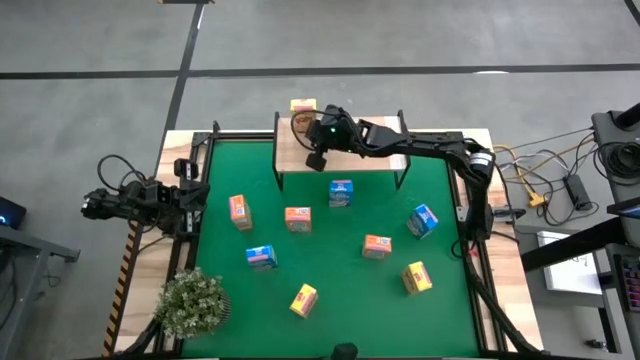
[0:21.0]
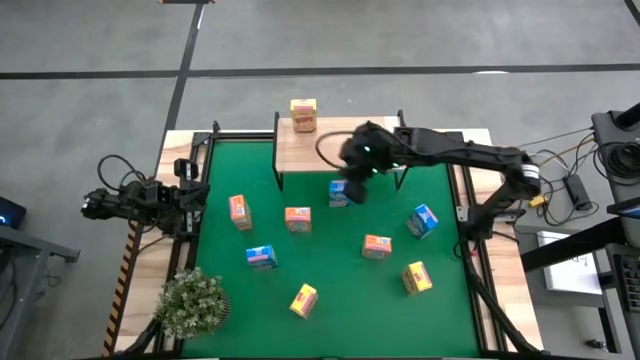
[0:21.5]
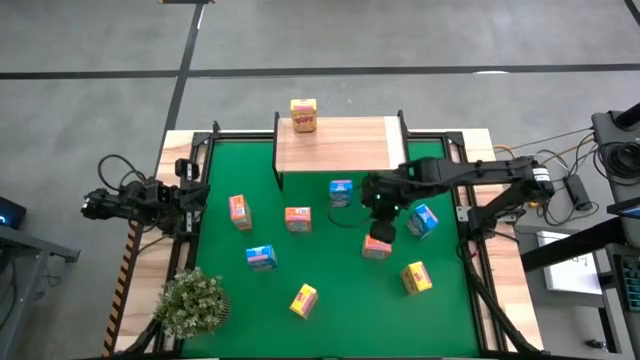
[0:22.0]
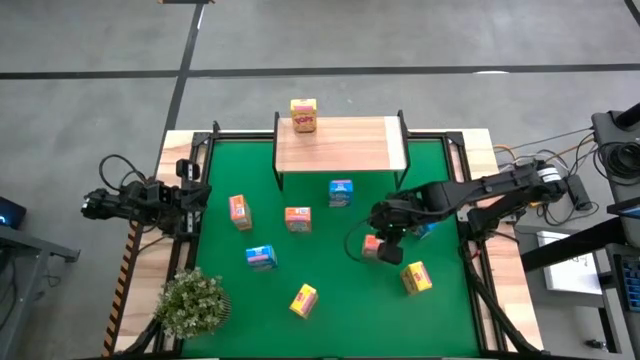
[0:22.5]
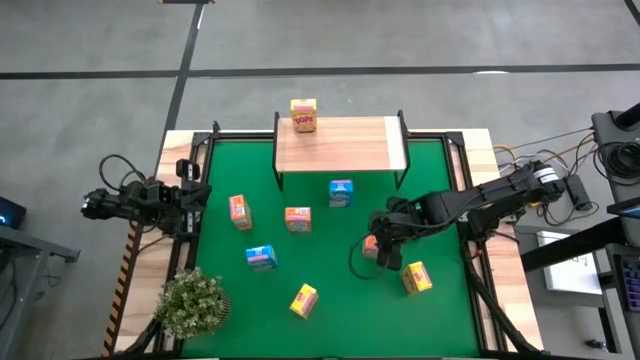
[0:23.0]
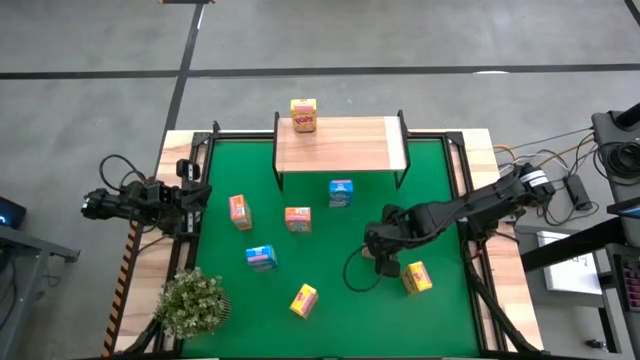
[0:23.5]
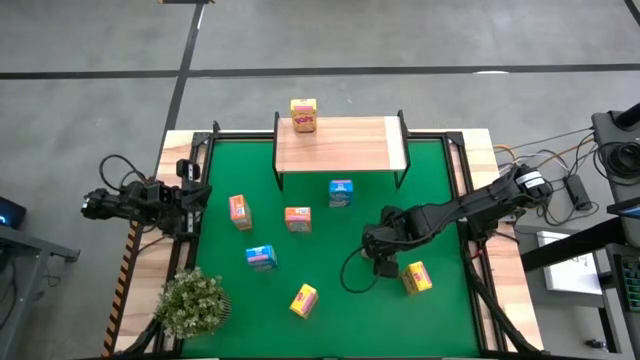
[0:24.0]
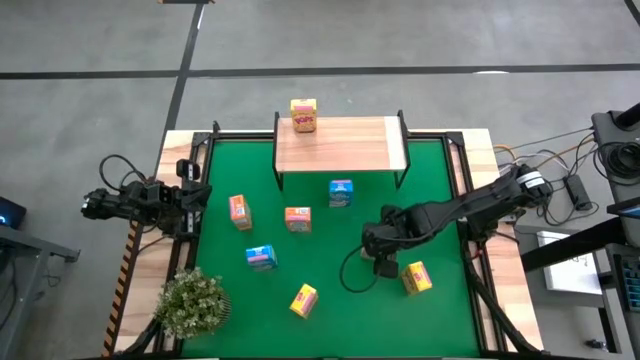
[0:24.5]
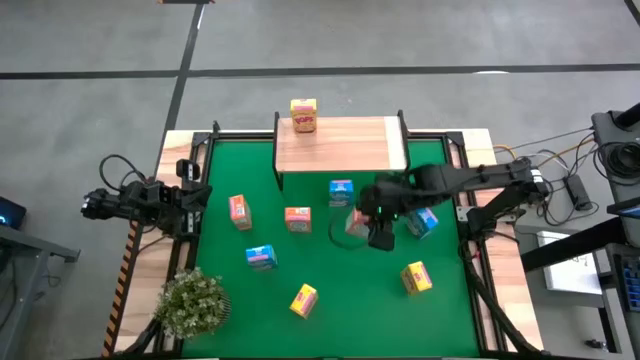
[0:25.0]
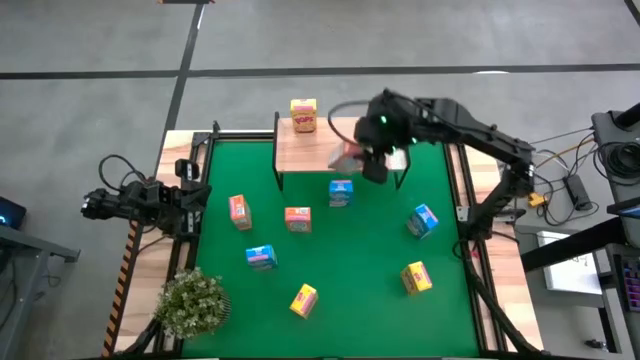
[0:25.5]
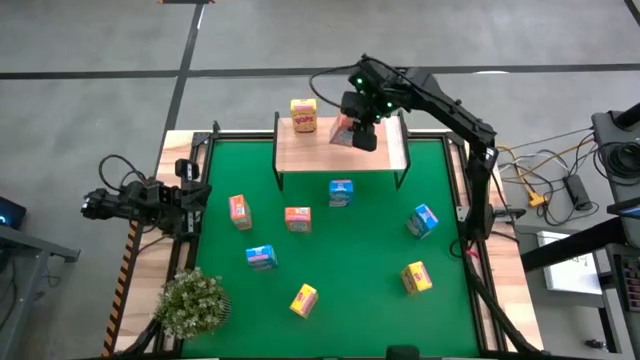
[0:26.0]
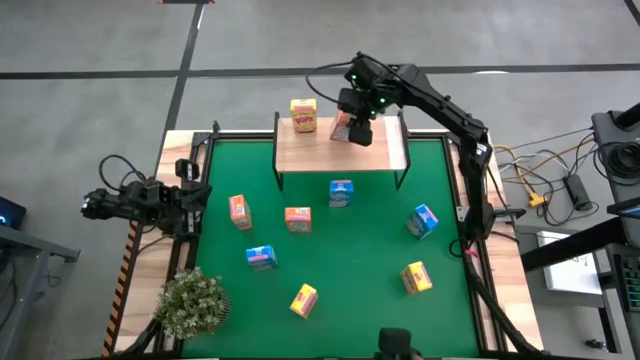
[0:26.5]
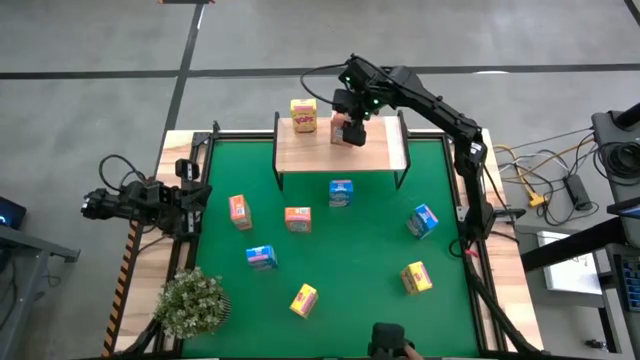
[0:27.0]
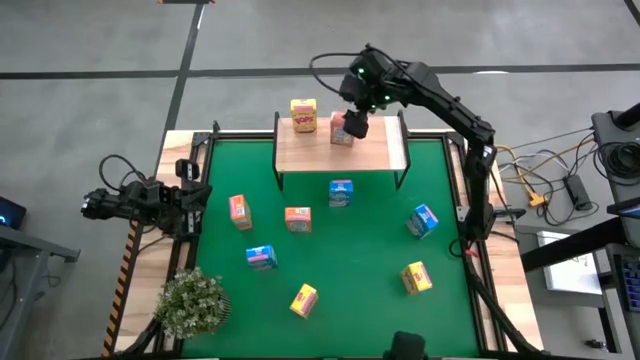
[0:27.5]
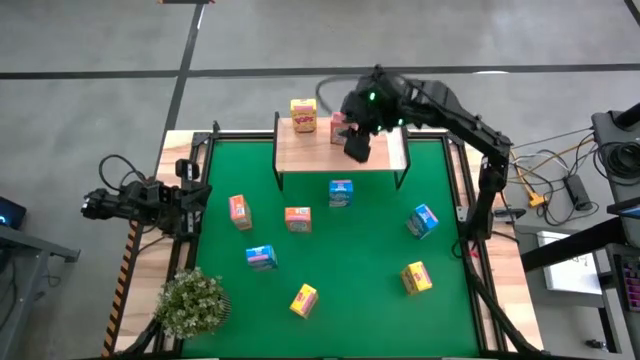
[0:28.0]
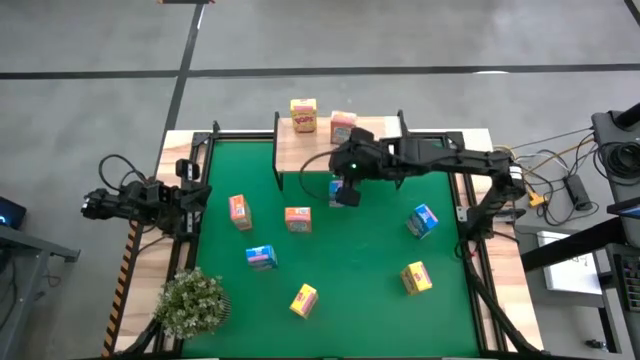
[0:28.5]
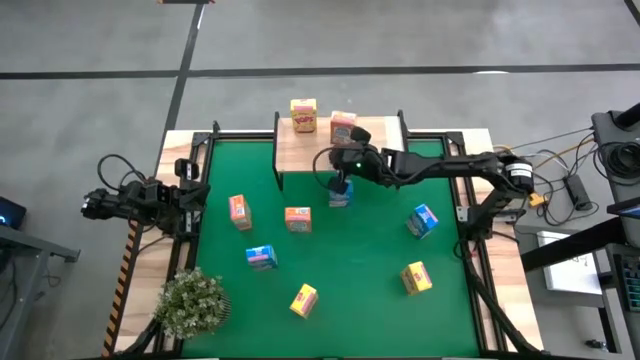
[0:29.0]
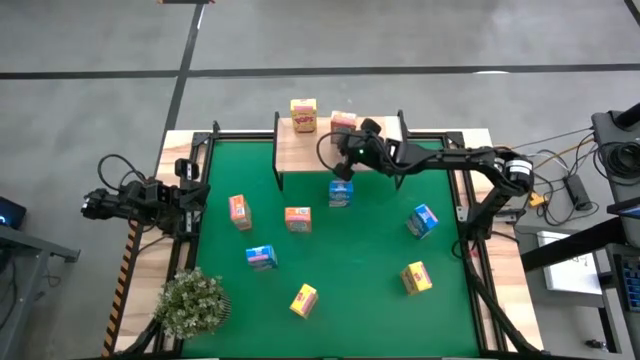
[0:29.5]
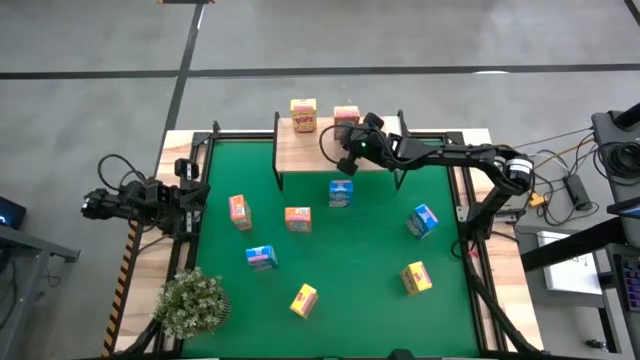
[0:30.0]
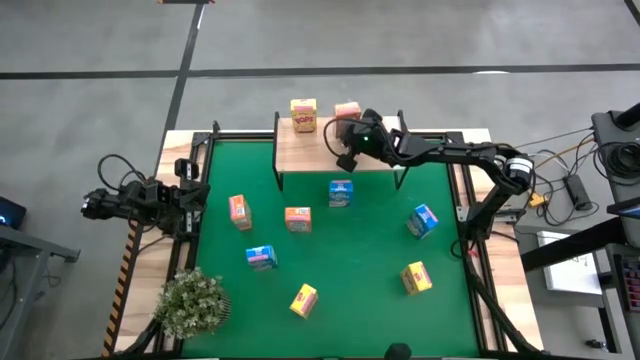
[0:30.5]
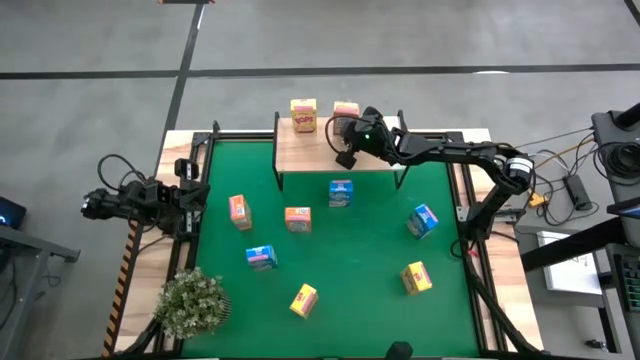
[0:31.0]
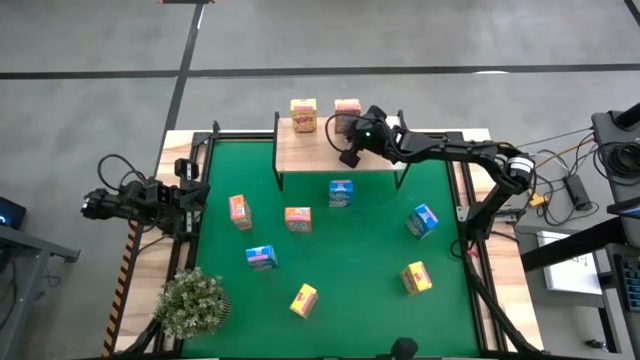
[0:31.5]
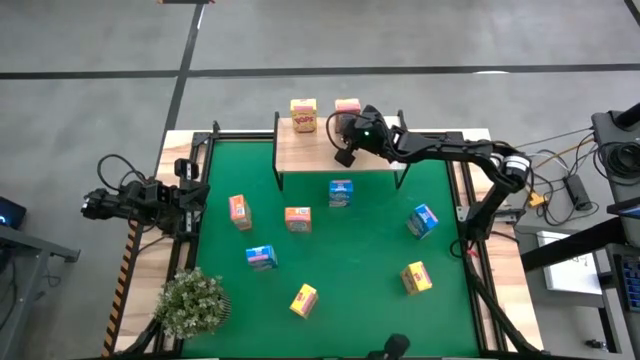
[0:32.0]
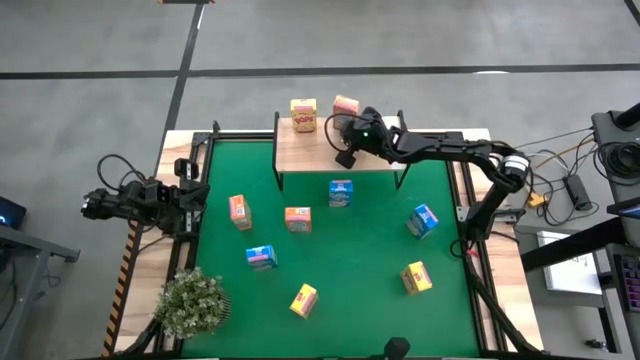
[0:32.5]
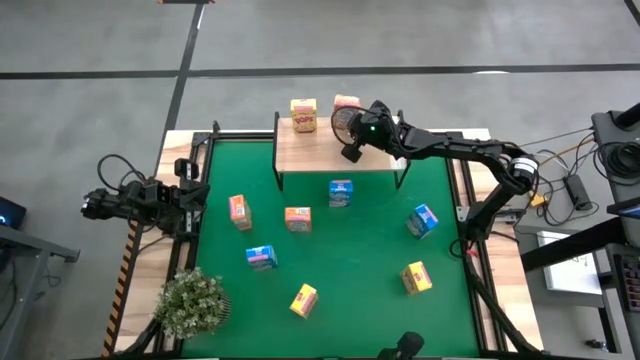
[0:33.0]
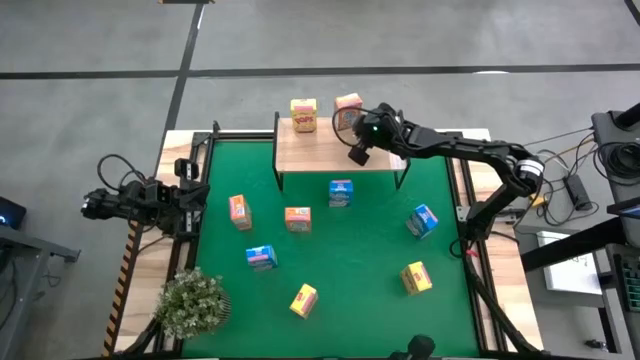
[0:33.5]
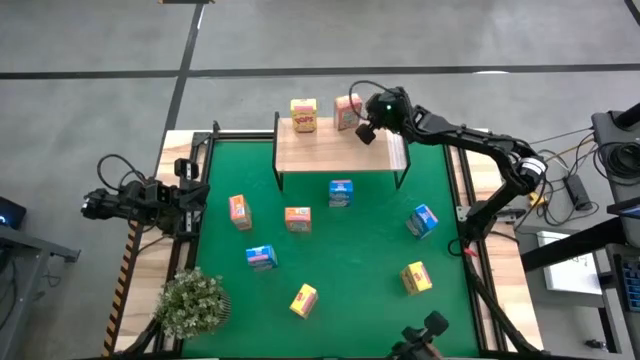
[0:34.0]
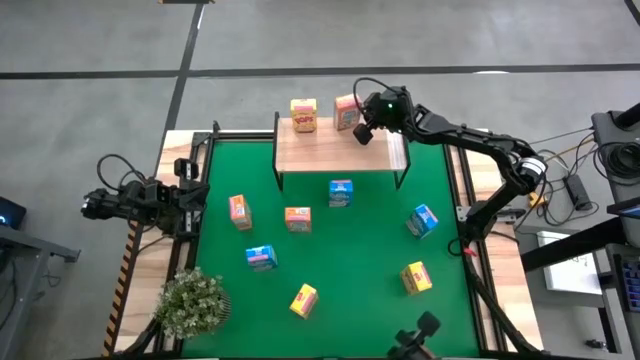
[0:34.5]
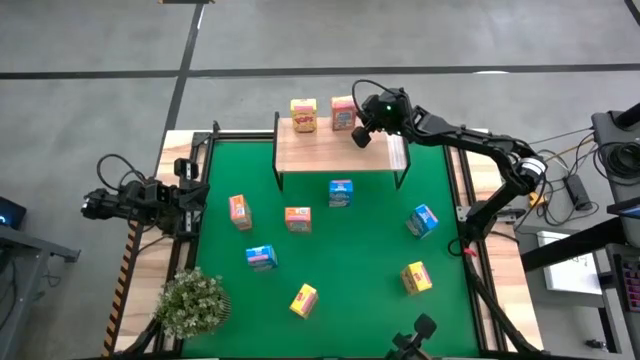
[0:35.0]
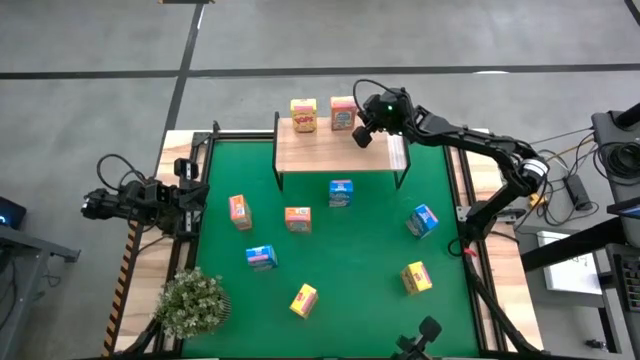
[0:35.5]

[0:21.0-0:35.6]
Task: Stack cereal on shelf
Put the right orange cereal box on the shelf

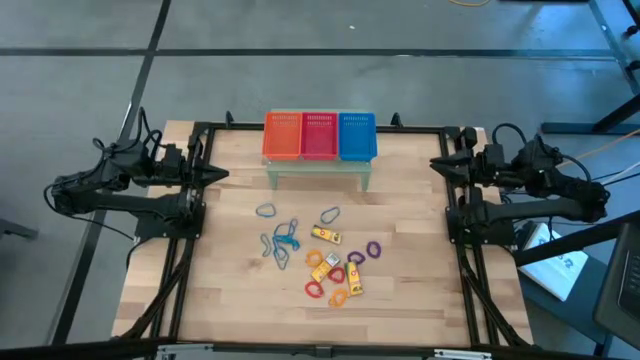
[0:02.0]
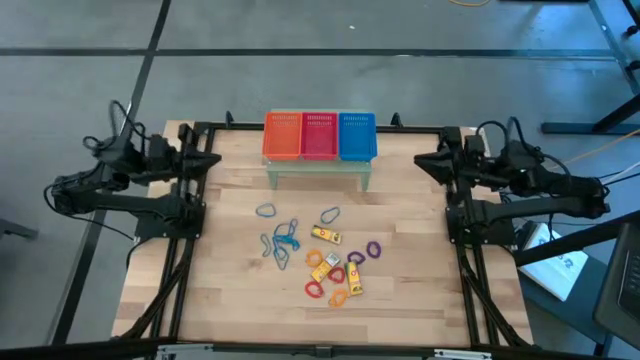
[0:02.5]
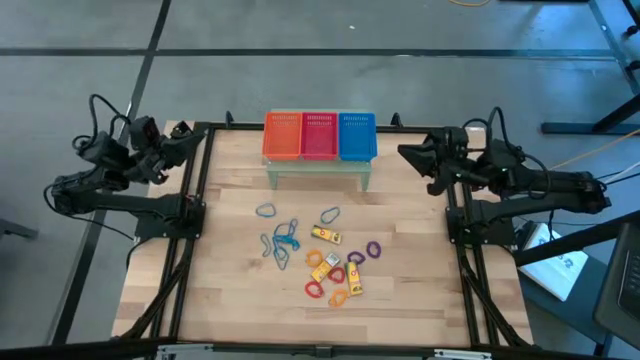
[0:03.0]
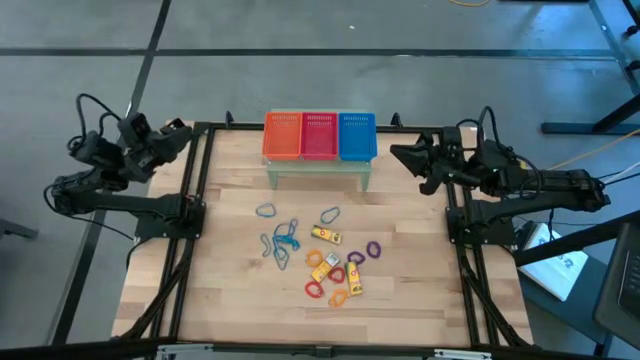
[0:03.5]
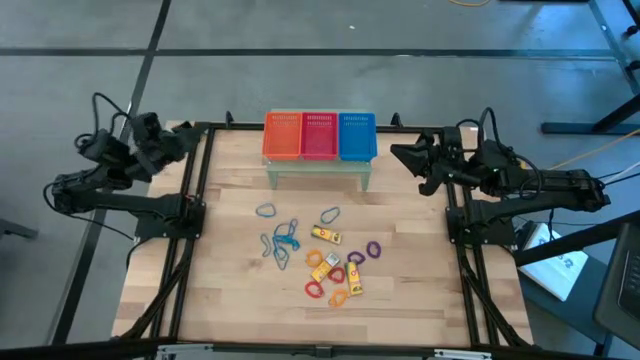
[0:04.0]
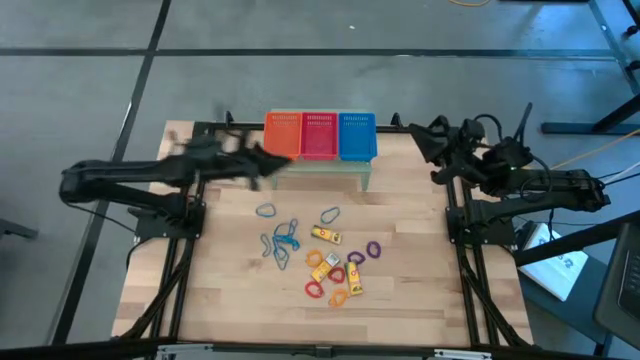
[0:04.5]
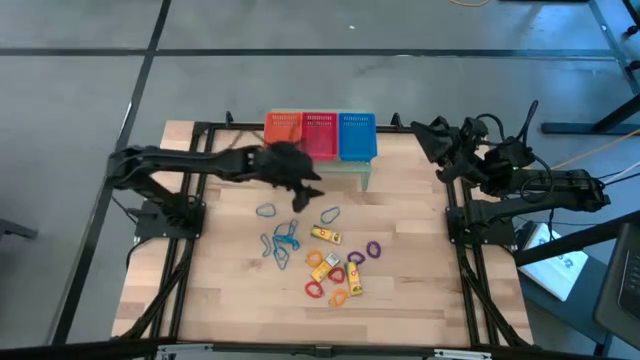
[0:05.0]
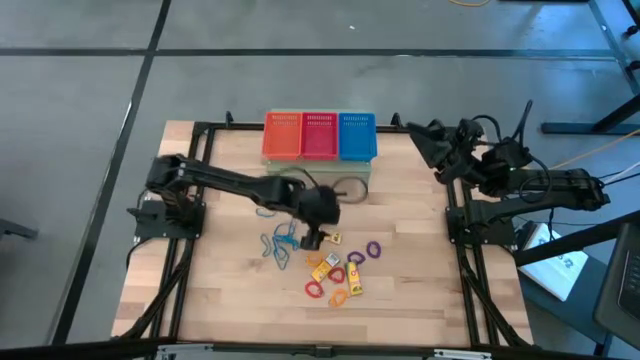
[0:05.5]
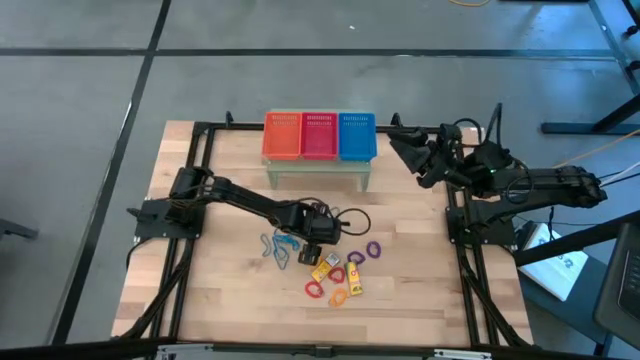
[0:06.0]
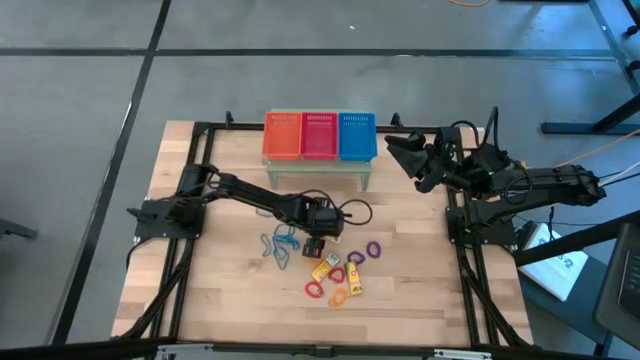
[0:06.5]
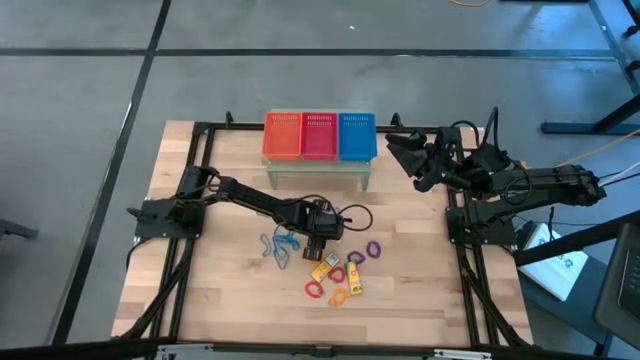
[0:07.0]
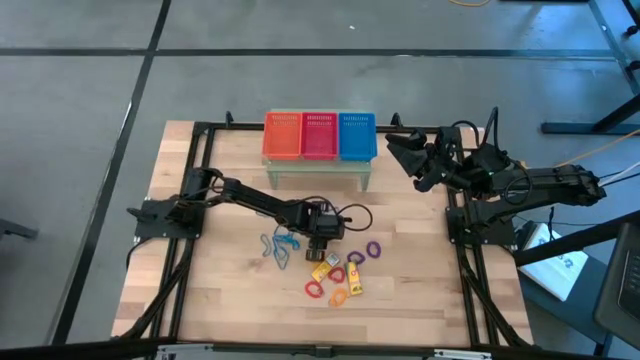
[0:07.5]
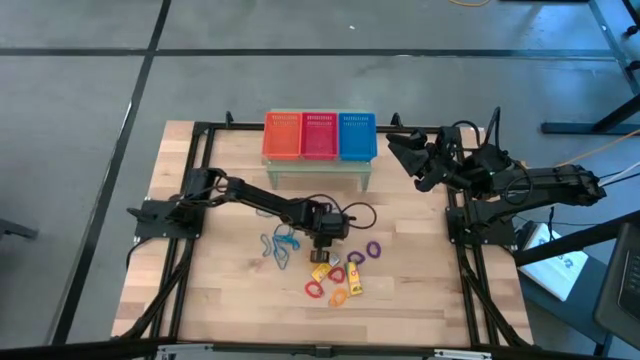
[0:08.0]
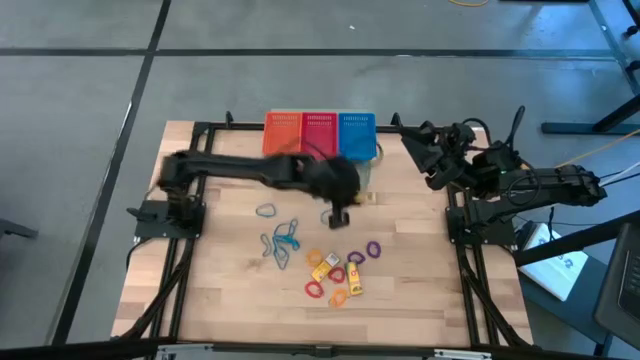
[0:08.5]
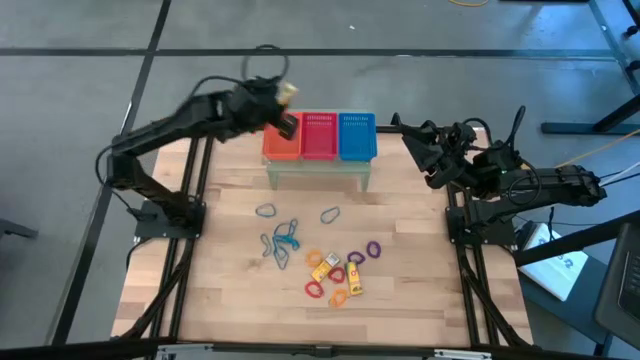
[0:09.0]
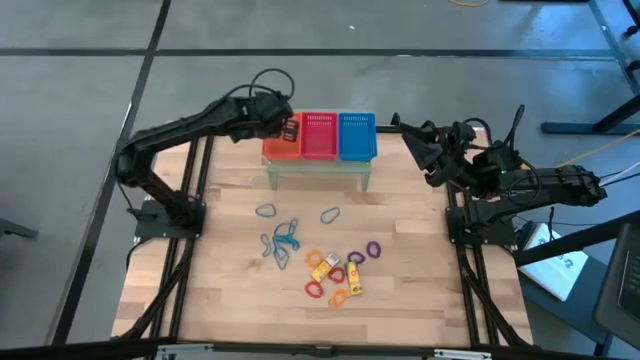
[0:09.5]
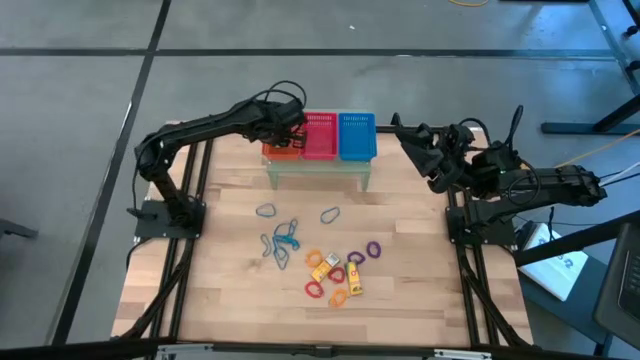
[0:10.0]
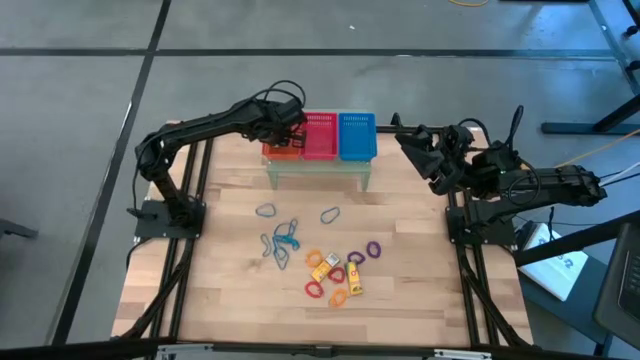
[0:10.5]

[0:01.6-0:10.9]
Task: Pick & Place Office Desk Supplies
Put the yellow box of crayon into the orange bin on the shelf
